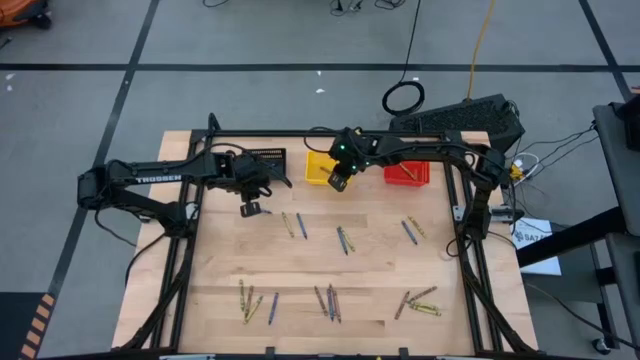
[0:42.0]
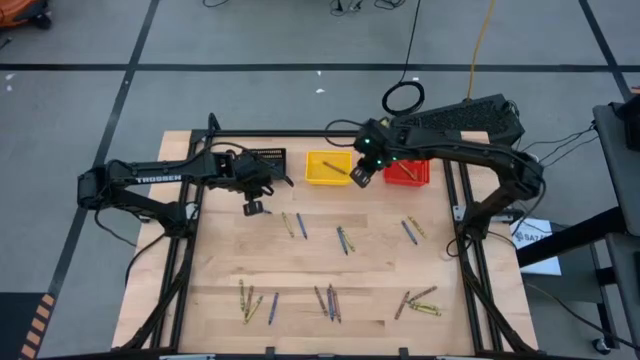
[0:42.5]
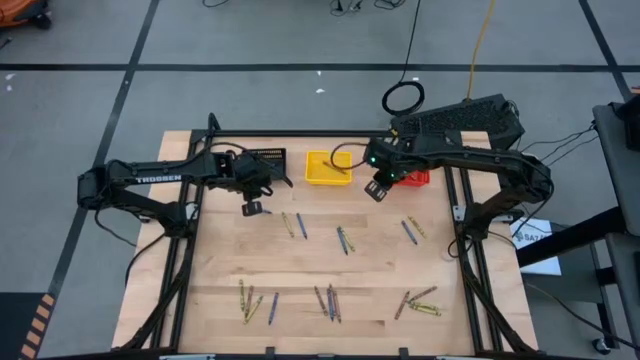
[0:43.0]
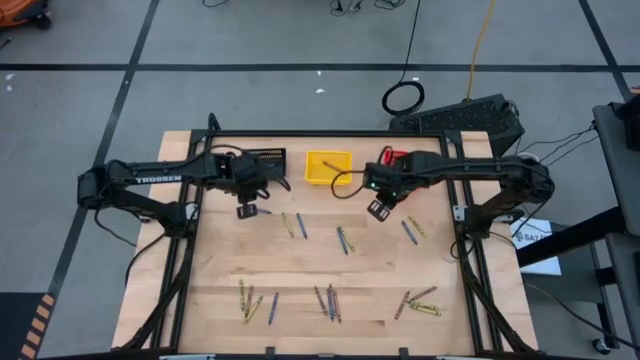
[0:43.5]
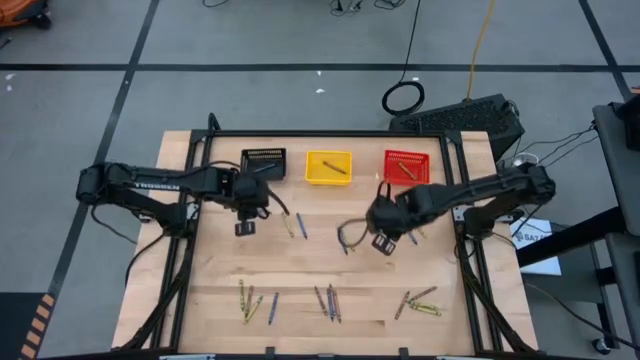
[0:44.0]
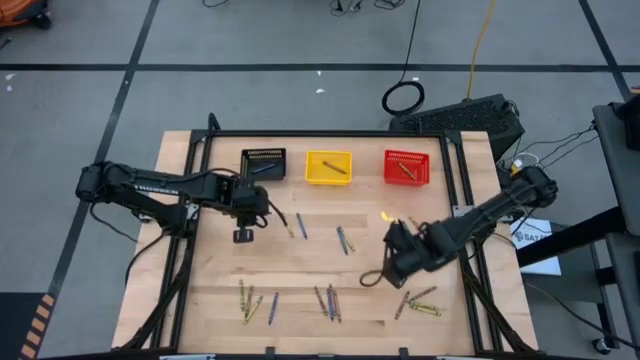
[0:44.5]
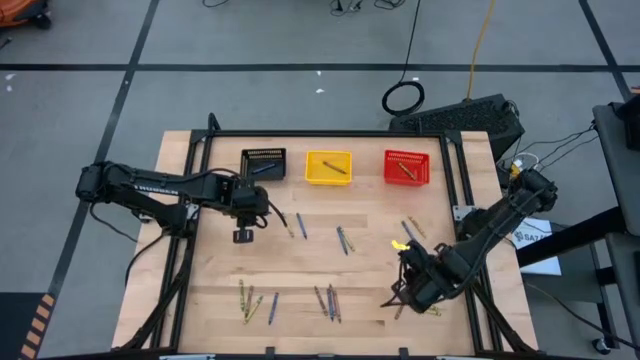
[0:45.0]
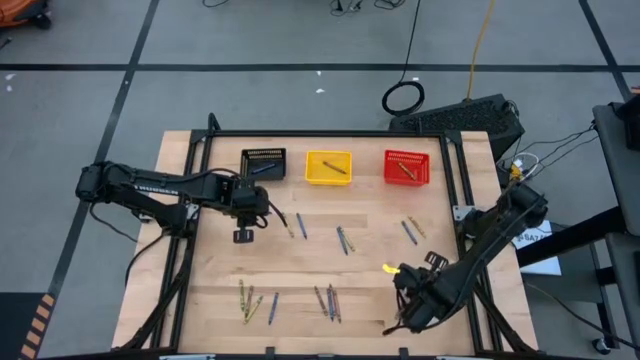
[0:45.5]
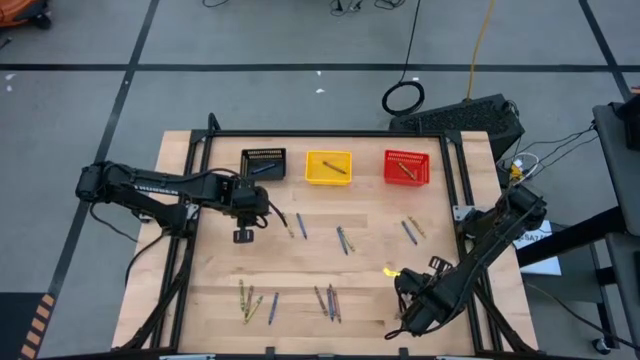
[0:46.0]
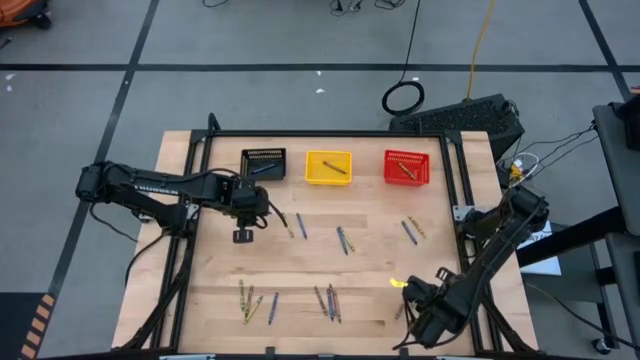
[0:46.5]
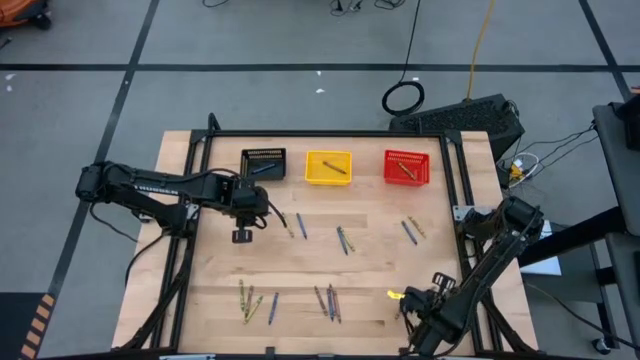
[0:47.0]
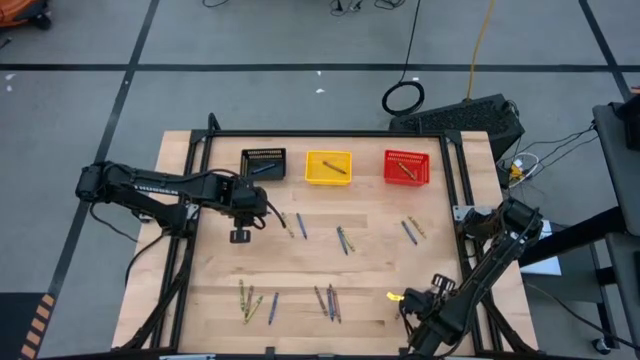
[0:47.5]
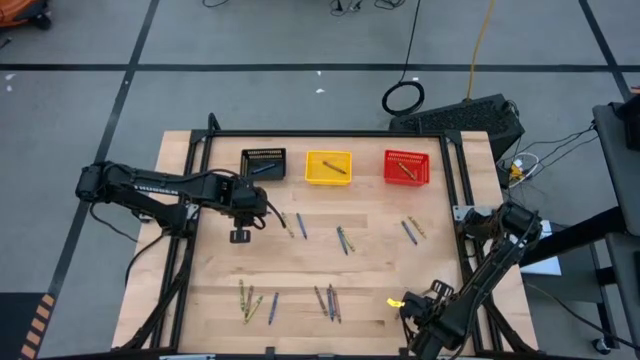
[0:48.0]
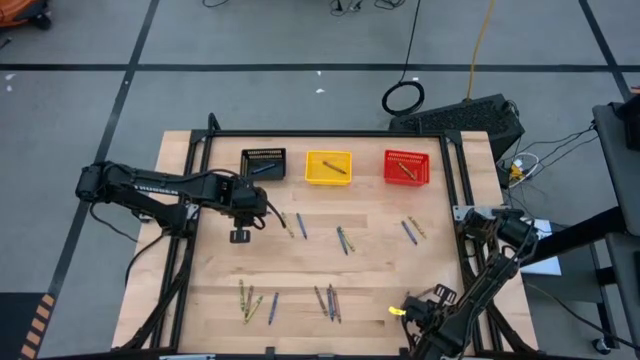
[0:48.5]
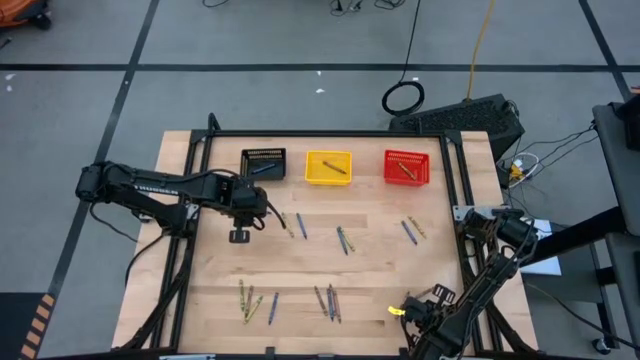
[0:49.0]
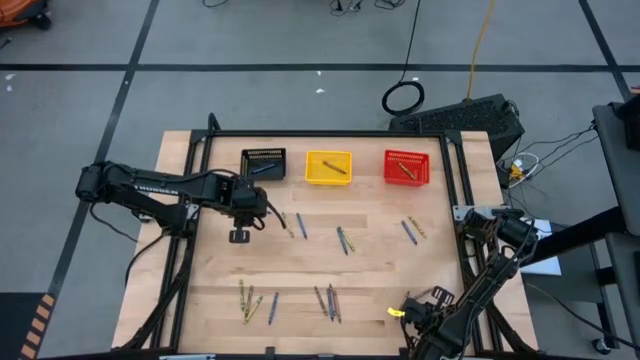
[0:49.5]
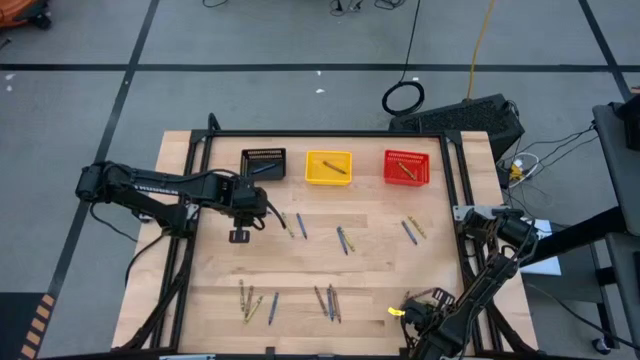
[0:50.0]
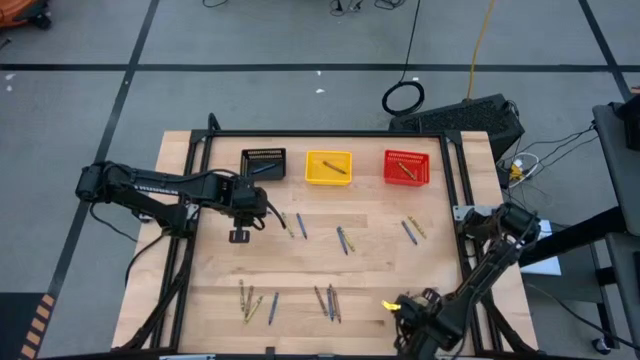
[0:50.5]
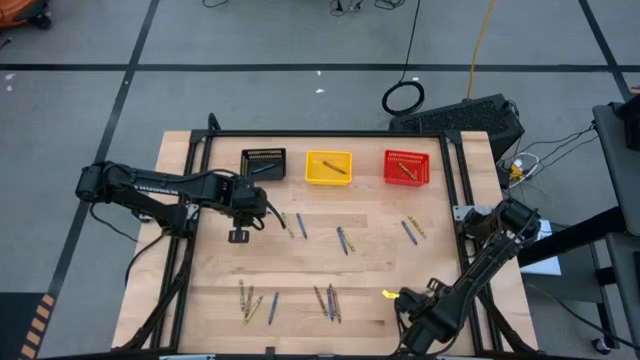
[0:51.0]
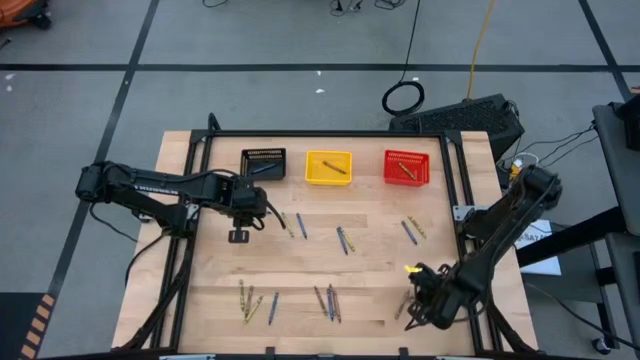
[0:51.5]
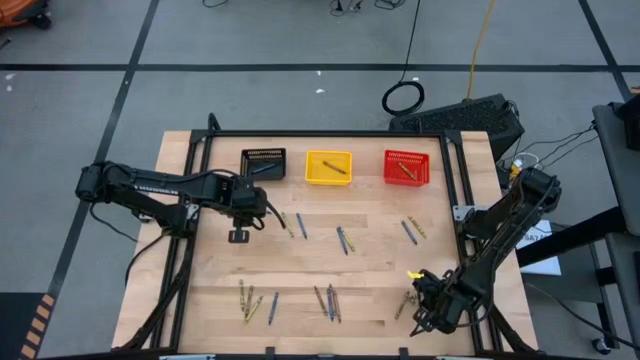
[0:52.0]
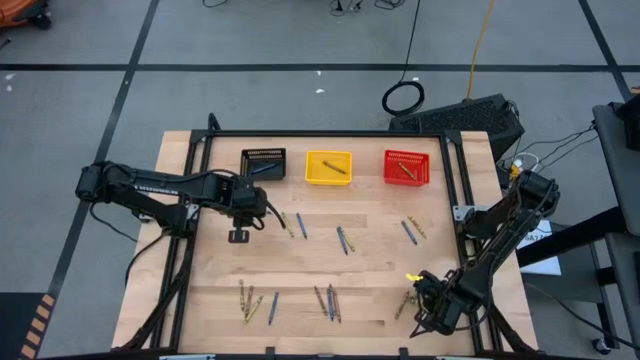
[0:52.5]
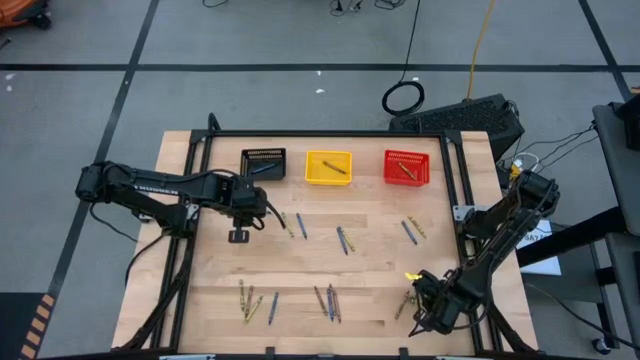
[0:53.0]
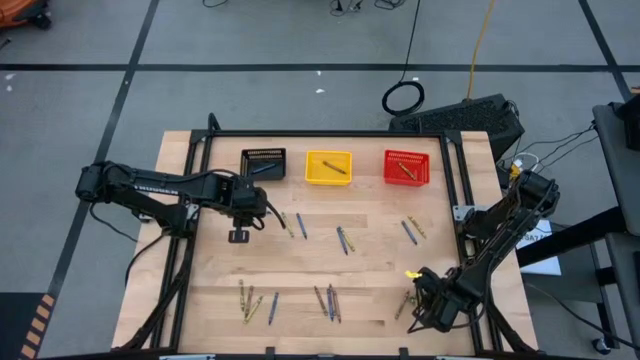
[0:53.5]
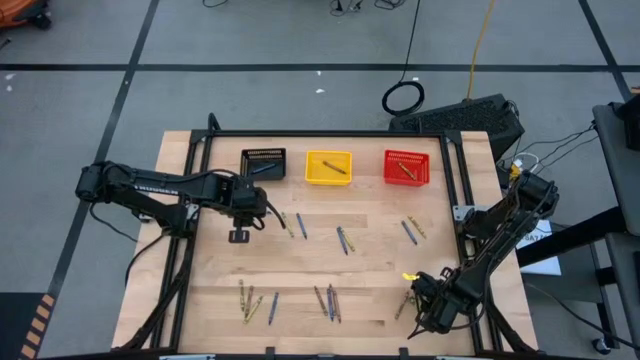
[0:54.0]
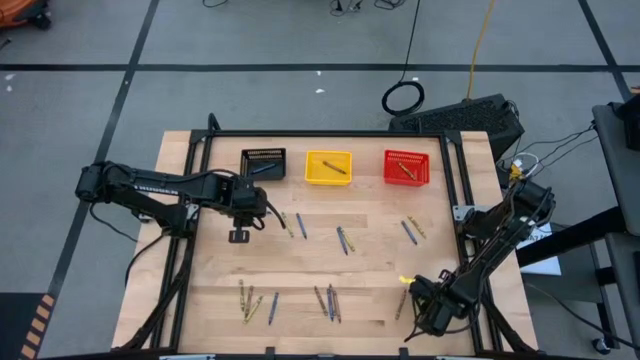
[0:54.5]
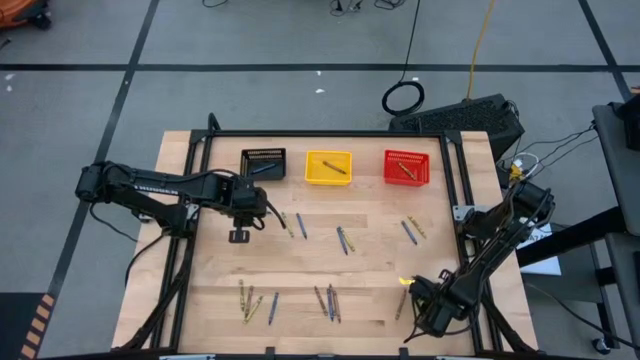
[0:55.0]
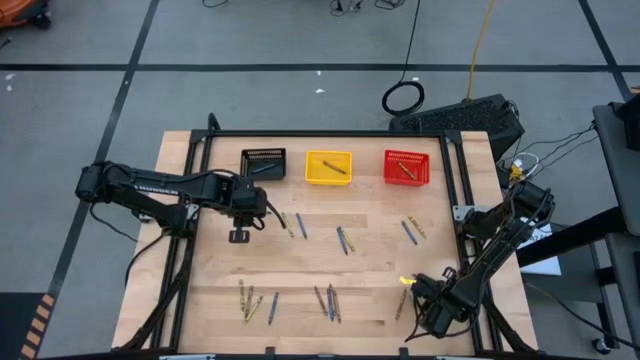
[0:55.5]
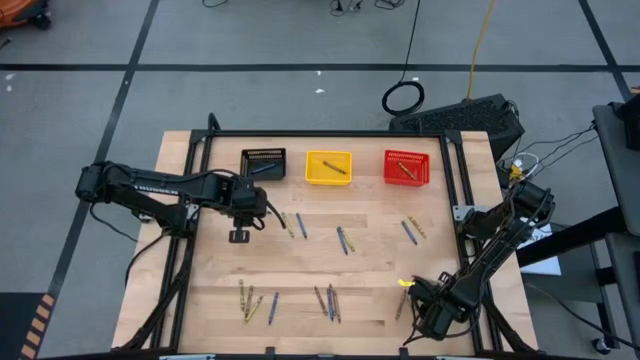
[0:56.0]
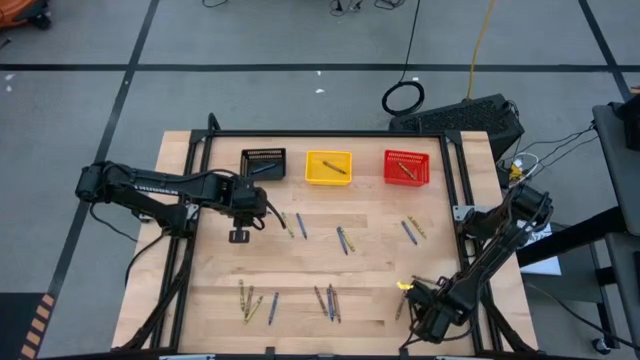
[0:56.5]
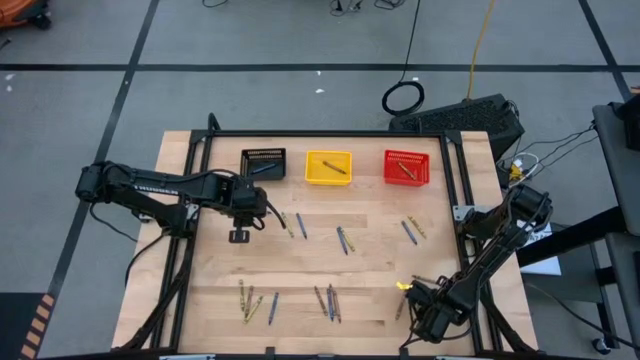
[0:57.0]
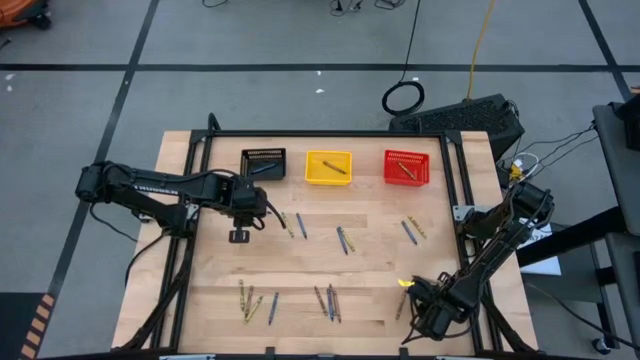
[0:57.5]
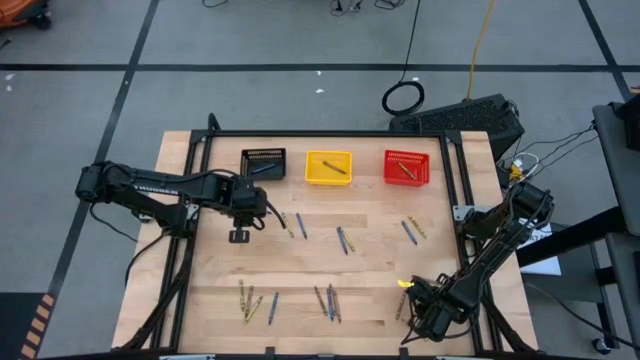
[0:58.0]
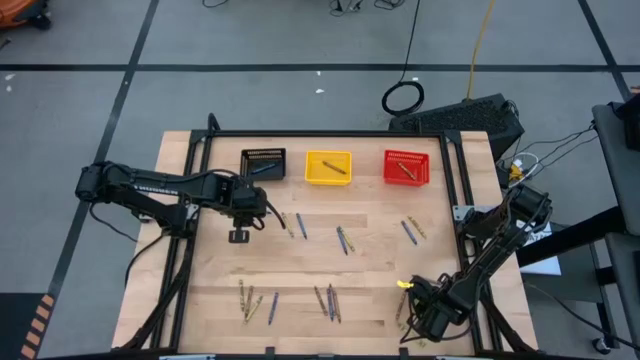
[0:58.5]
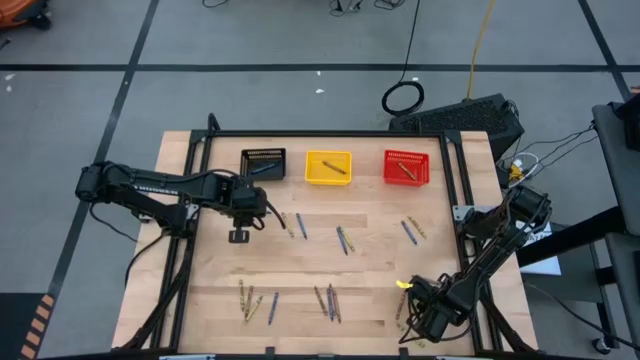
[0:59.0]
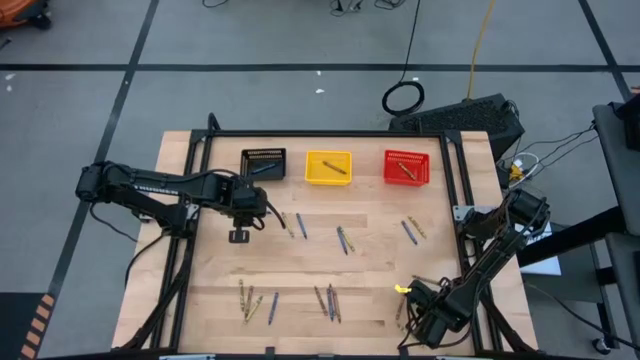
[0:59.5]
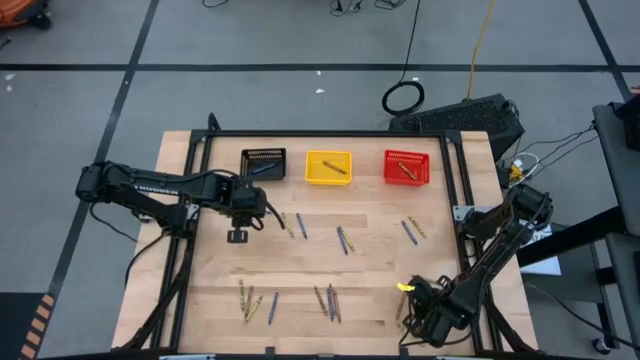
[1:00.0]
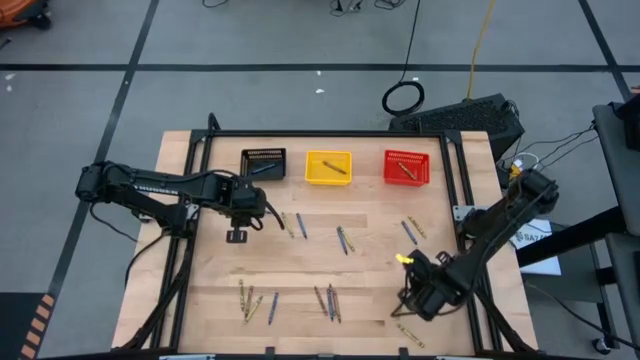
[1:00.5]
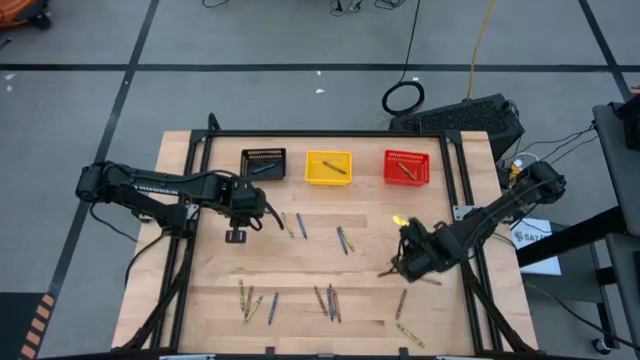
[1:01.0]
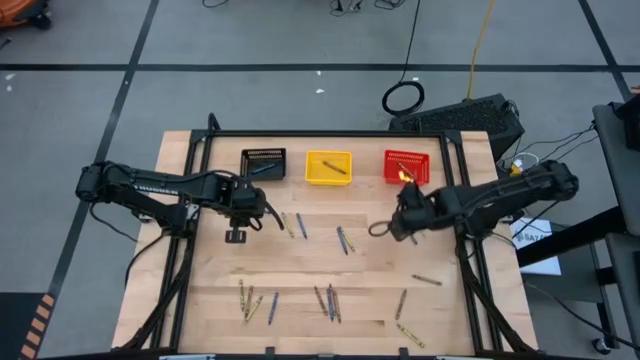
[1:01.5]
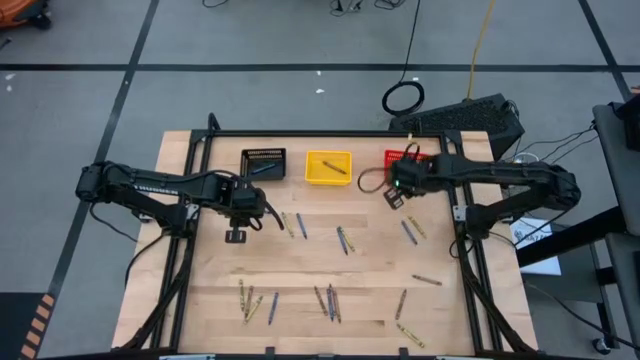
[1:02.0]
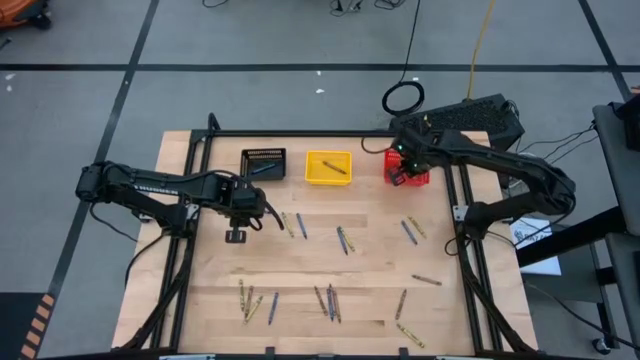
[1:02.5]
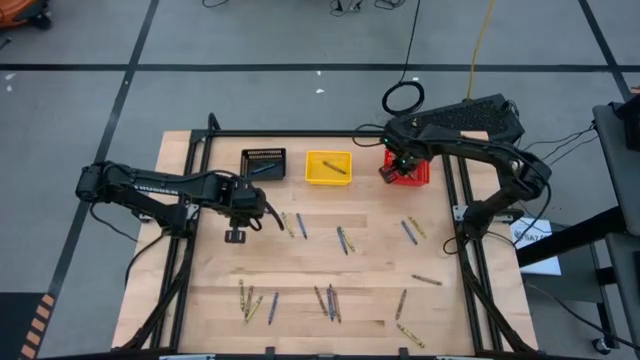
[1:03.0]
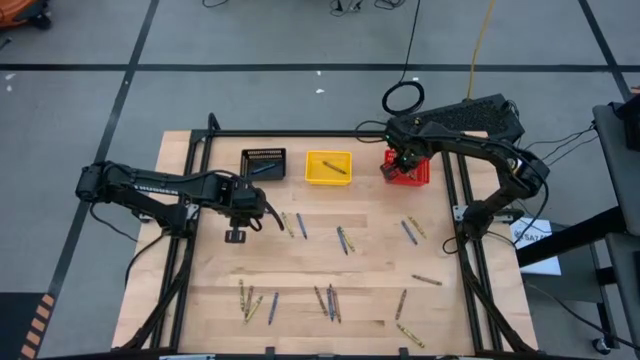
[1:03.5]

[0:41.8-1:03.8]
Task: Sort crayons
Put the green crayon into the red bin
